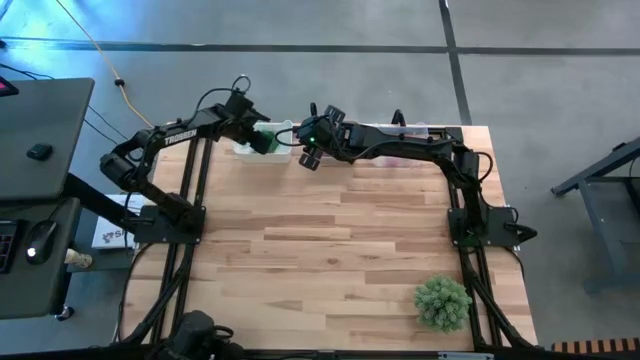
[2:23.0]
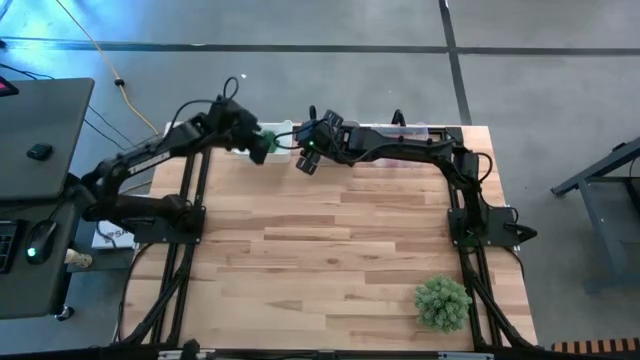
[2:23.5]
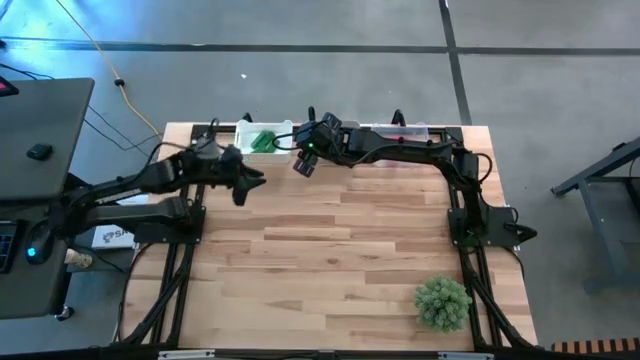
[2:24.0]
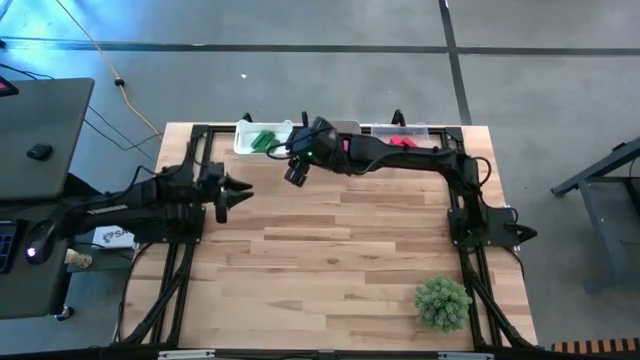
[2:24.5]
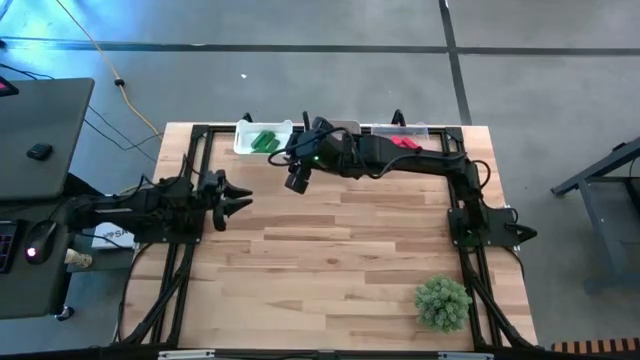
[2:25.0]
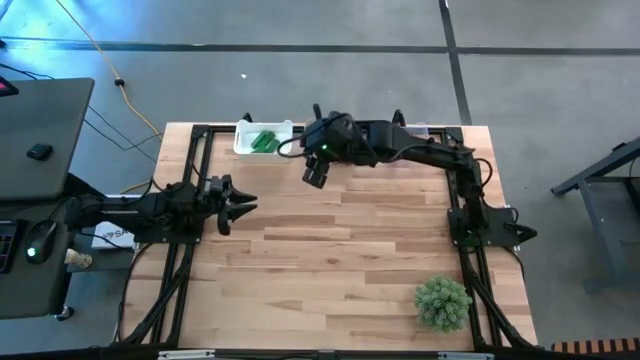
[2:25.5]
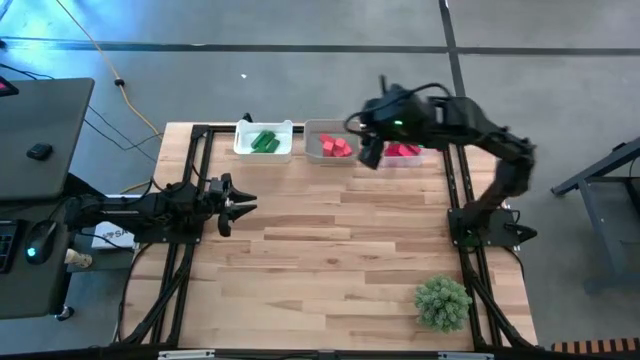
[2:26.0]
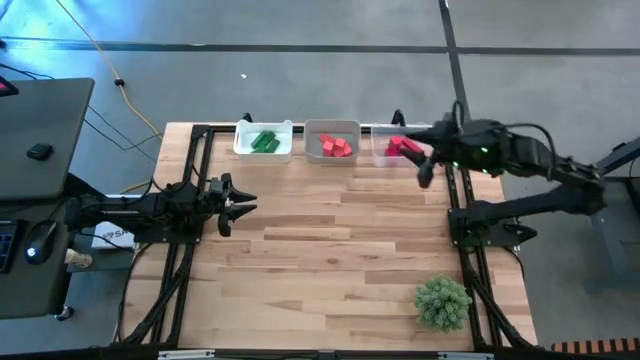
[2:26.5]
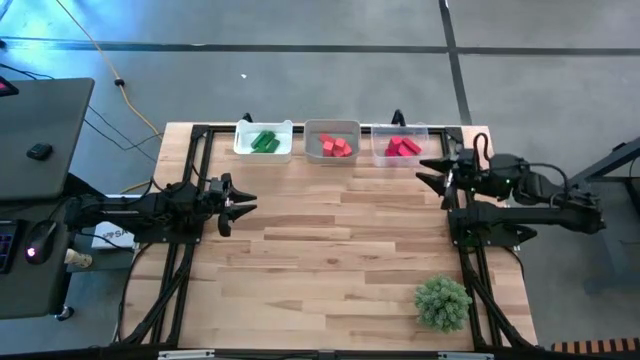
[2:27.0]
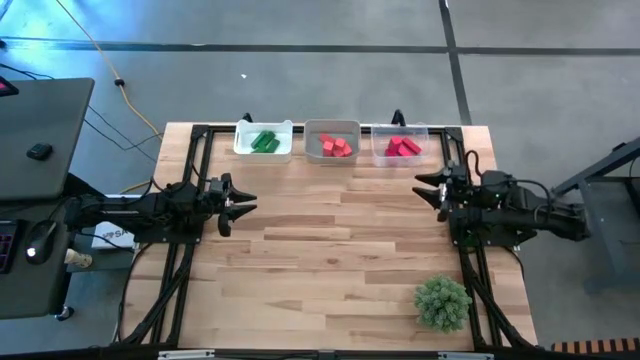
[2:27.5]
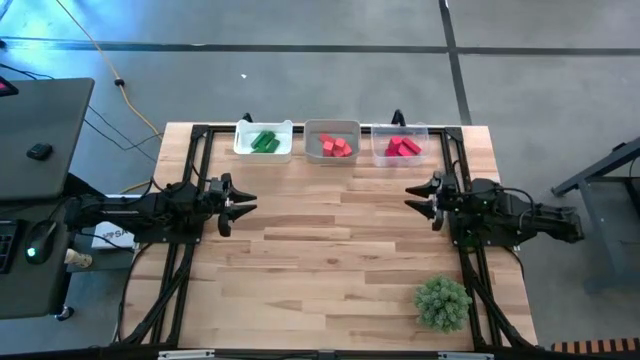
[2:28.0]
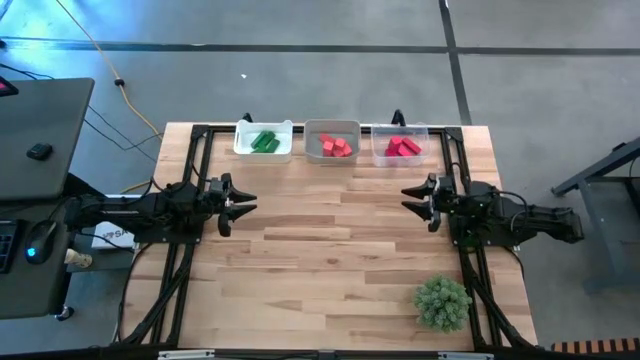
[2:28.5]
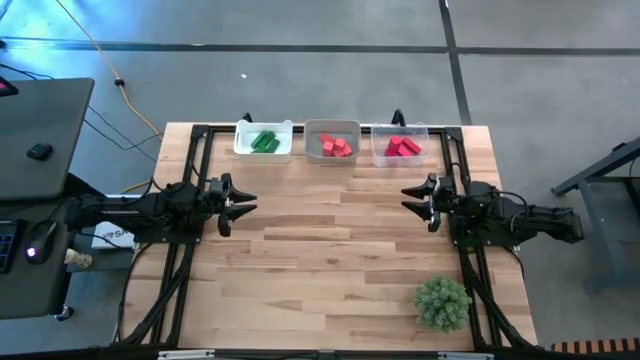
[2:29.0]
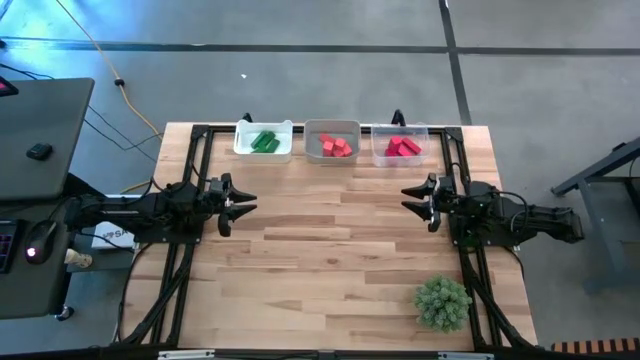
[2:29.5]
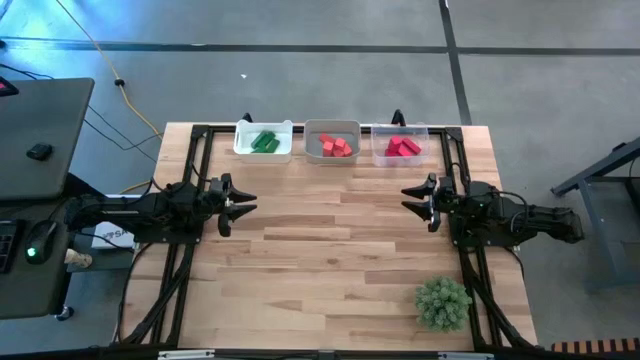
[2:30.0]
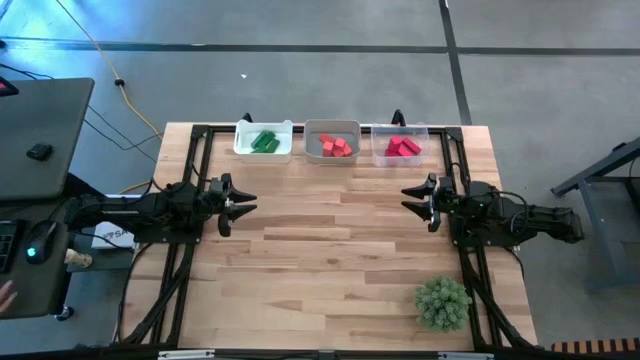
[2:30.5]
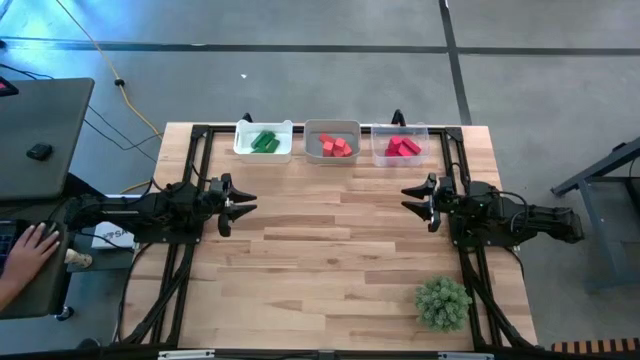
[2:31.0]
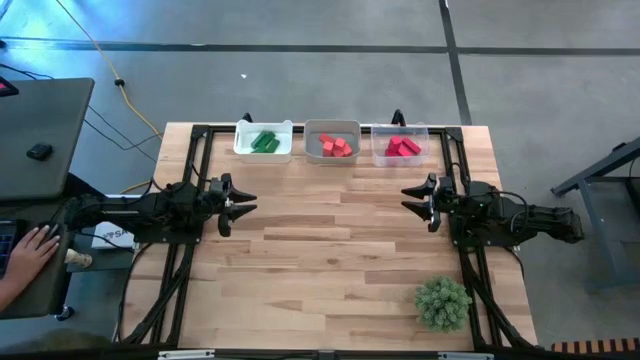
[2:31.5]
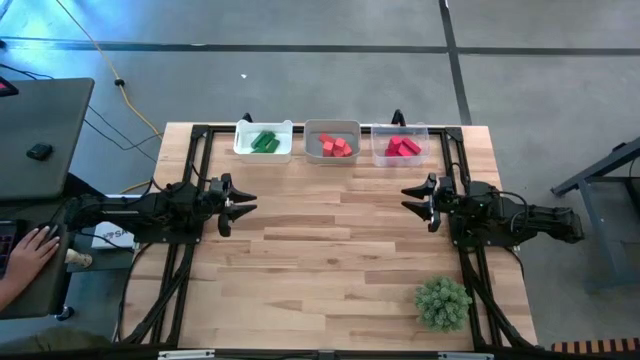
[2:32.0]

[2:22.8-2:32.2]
Task: Sort & place blocks by color
Return to Home Position

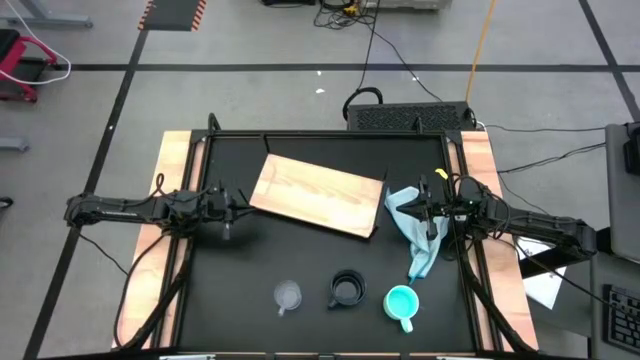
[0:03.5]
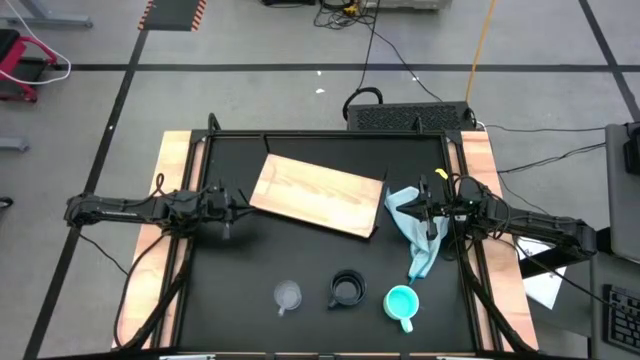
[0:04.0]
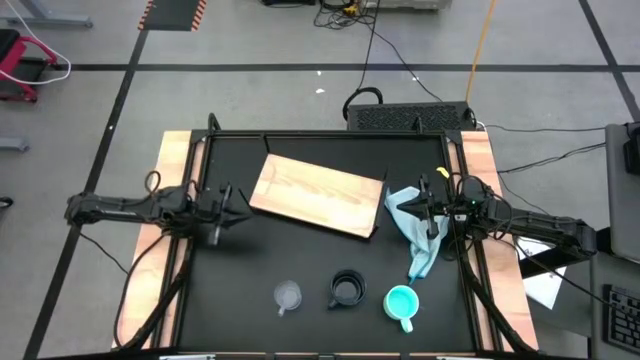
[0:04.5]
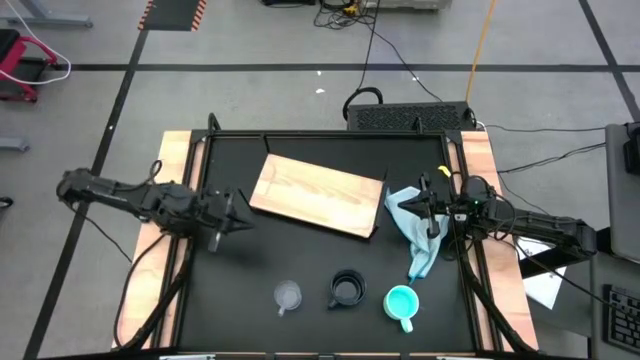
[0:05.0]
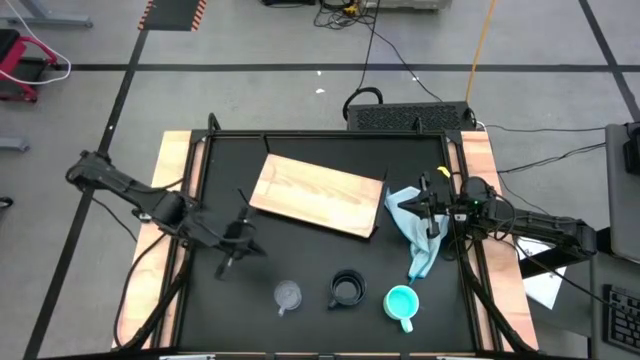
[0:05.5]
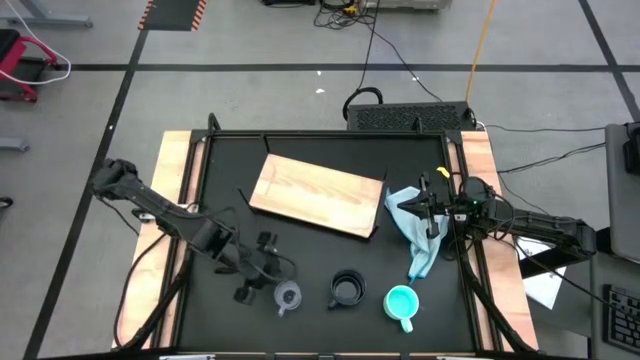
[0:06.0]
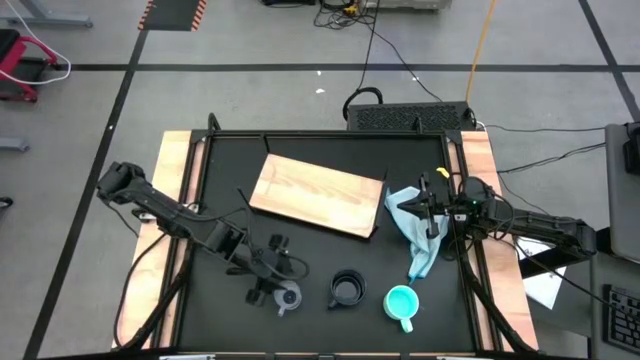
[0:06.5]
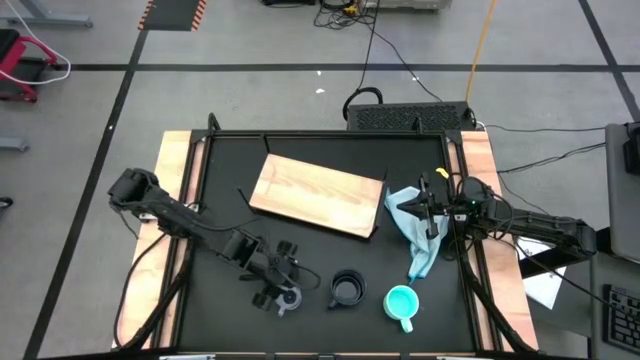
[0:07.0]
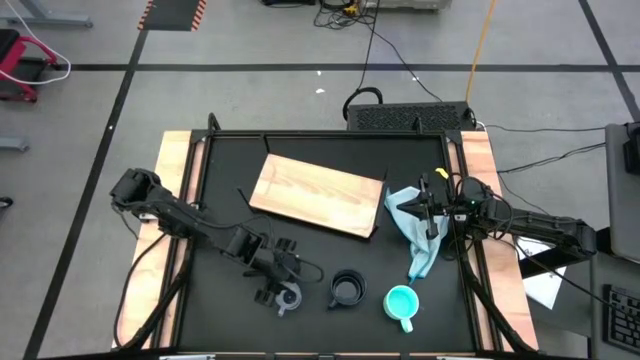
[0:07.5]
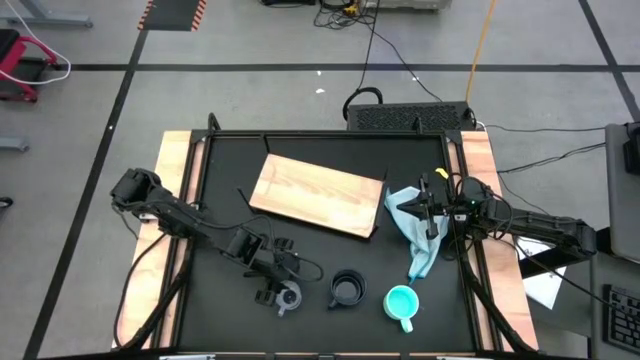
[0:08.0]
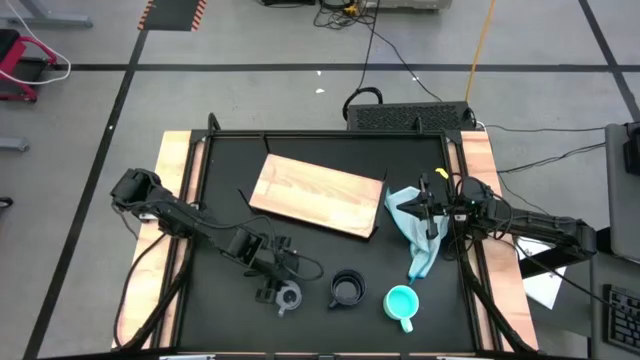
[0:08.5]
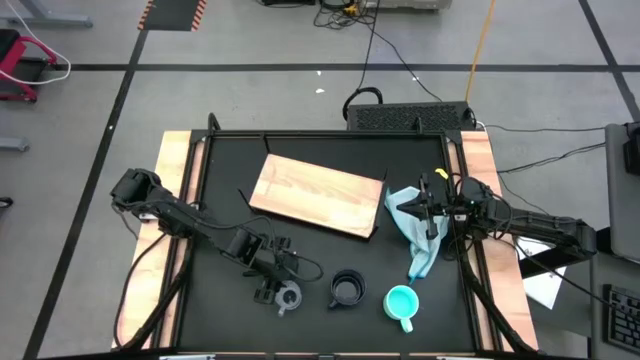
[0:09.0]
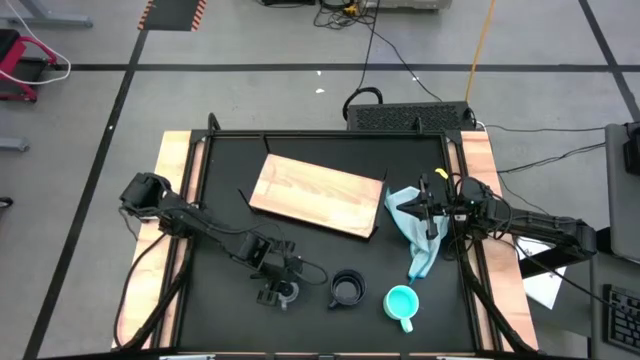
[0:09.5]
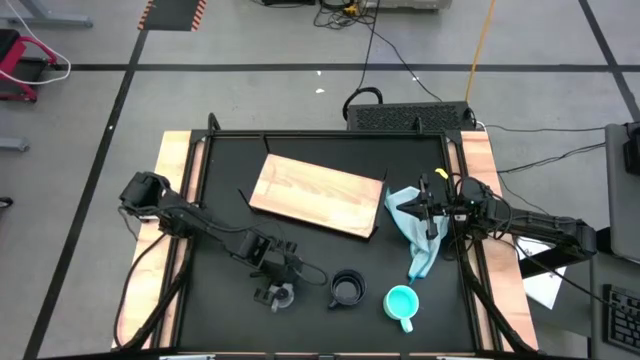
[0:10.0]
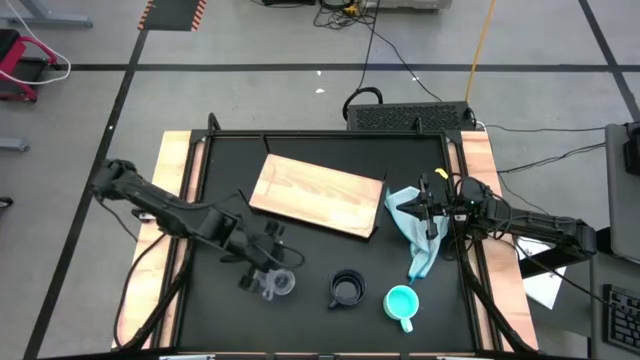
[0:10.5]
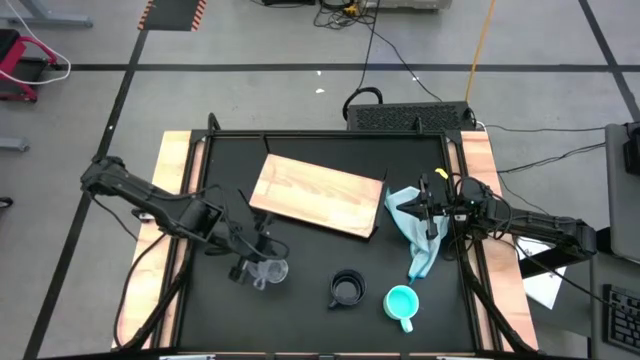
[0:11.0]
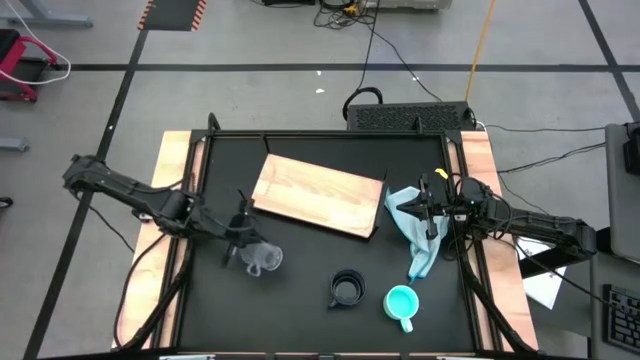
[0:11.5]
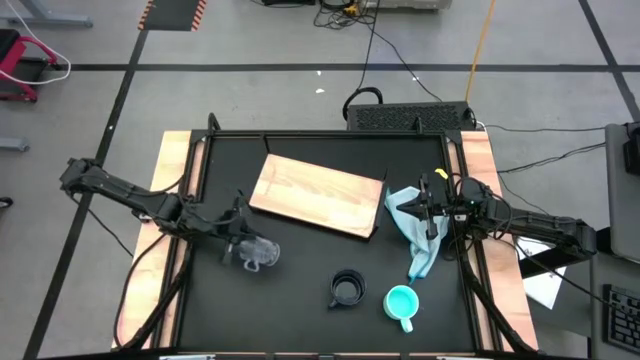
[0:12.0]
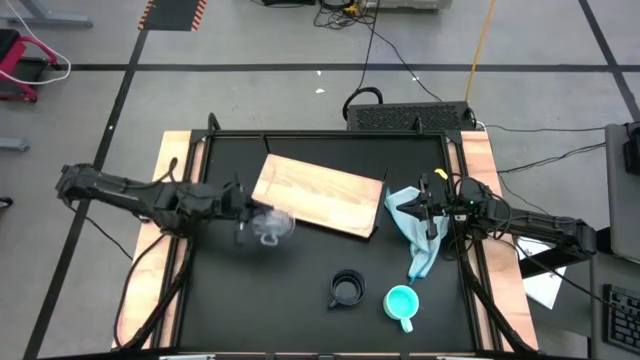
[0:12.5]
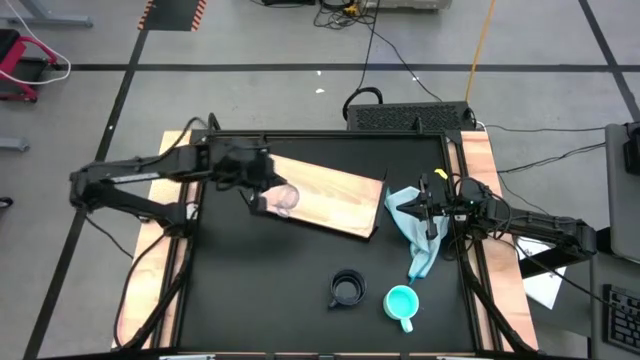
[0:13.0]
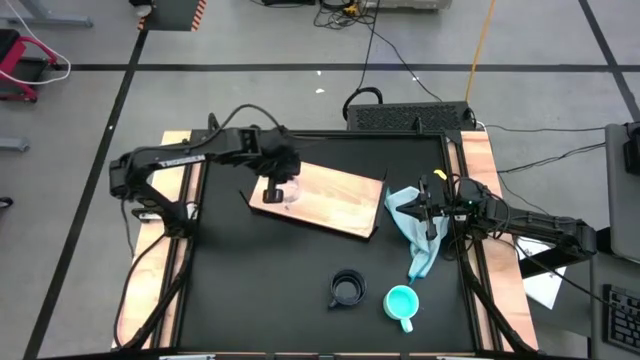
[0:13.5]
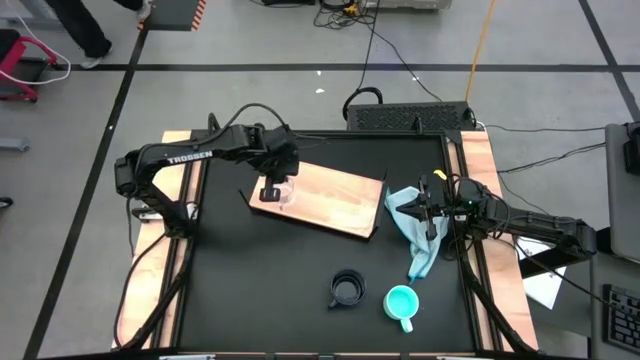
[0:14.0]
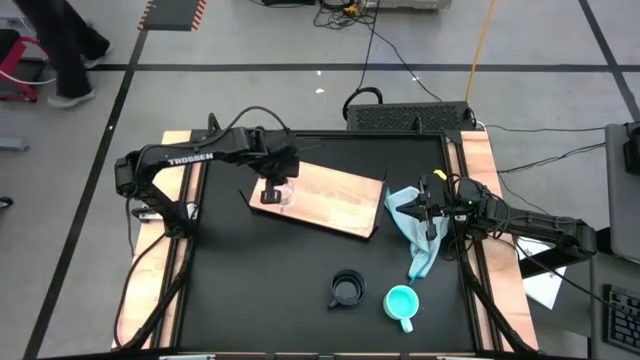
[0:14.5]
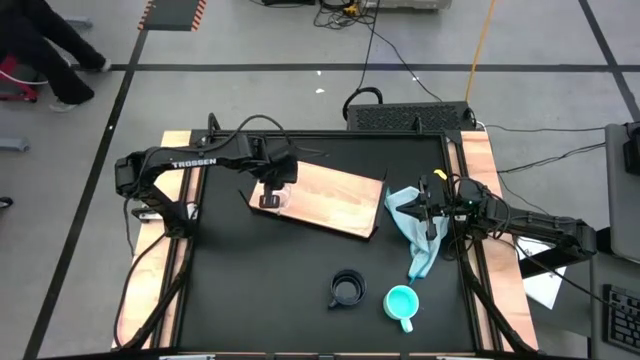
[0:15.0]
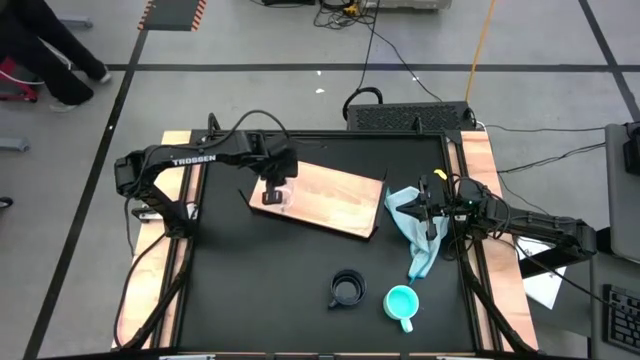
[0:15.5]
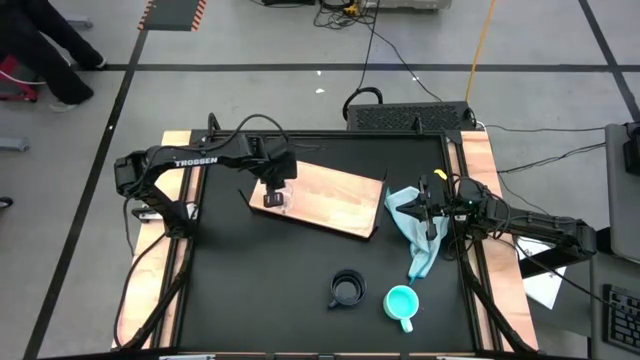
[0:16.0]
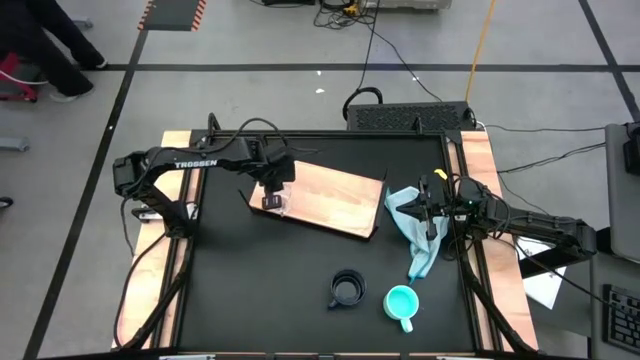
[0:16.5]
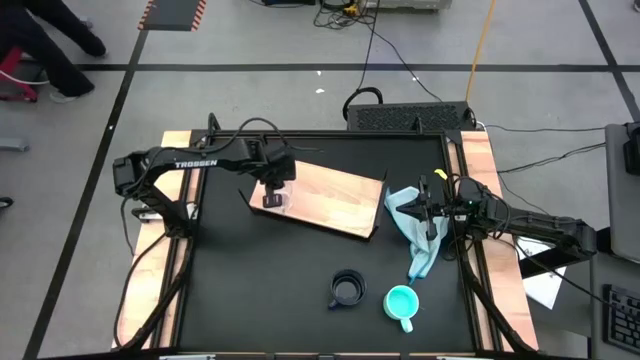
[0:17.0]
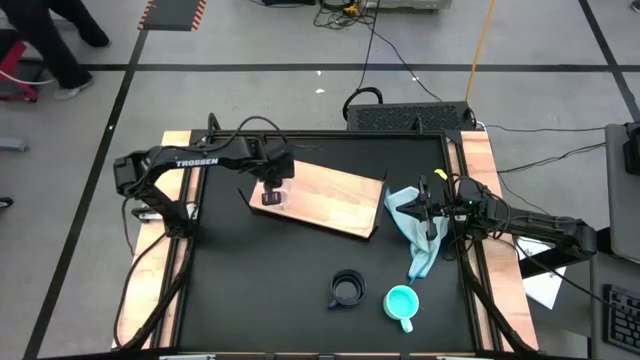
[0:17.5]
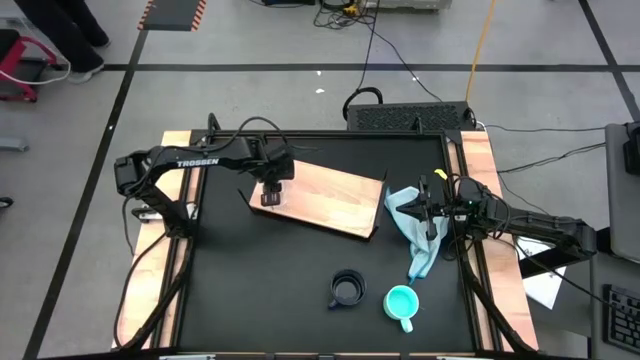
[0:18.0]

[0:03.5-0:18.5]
Task: Stack small to large cups/mugs on shelf
Put the transparent mug on the shelf
